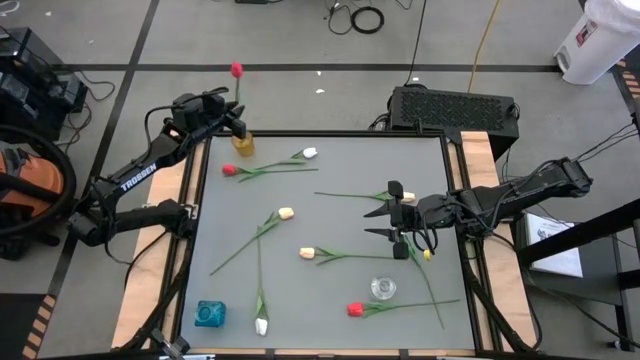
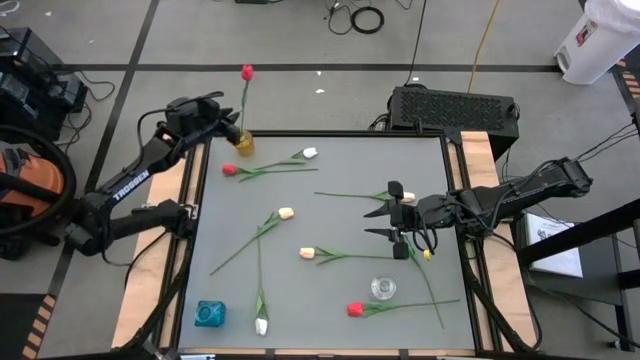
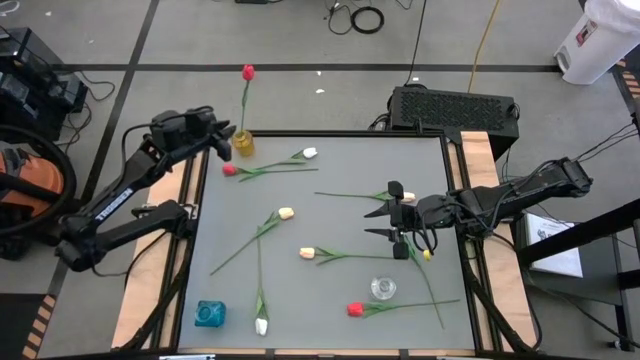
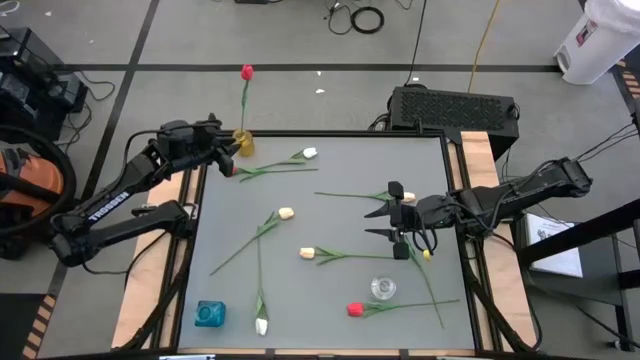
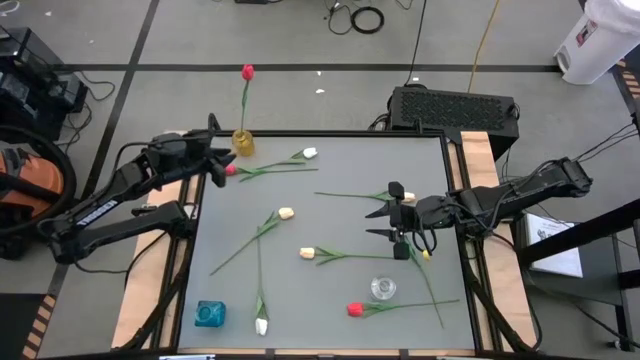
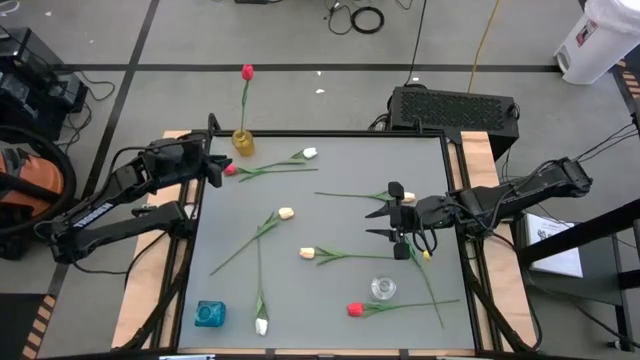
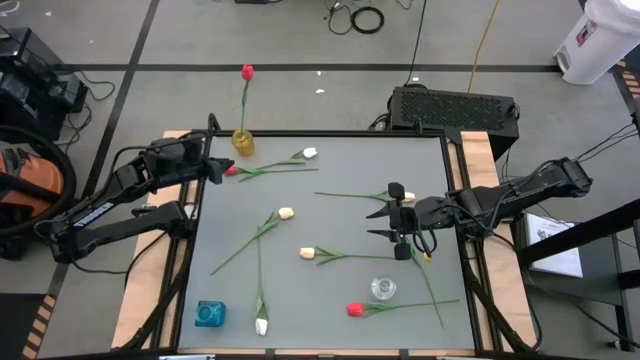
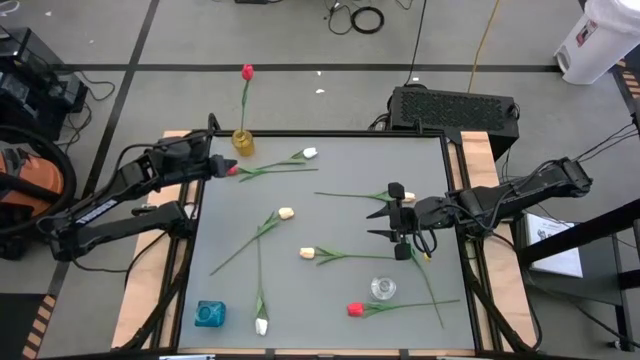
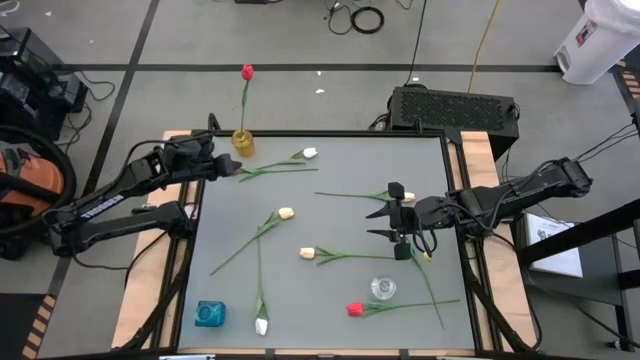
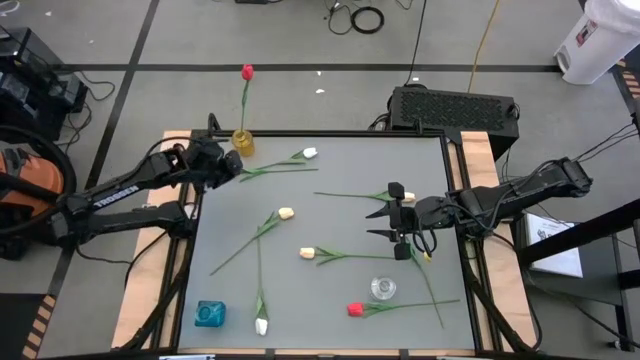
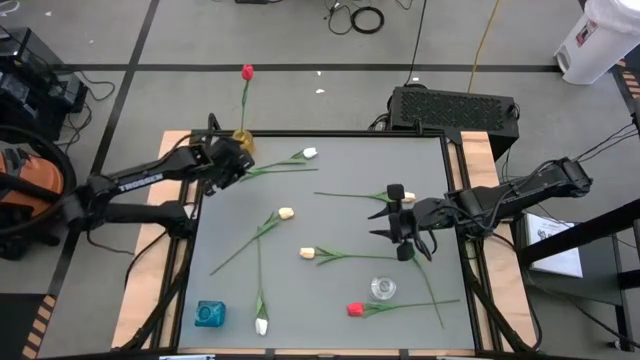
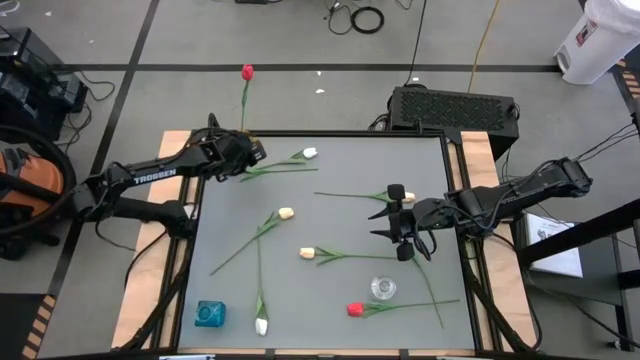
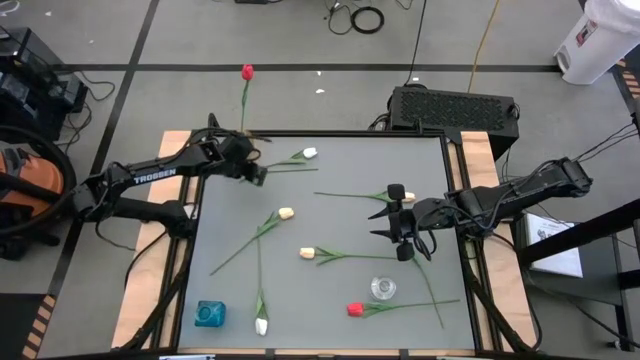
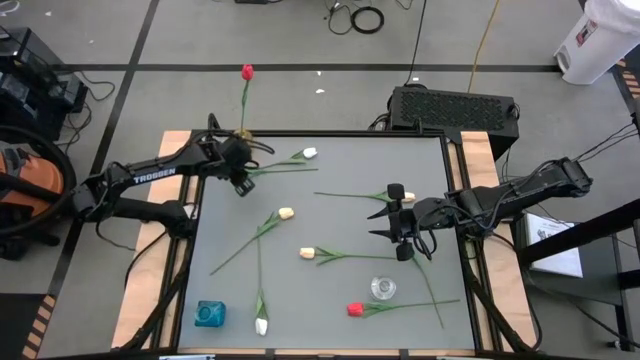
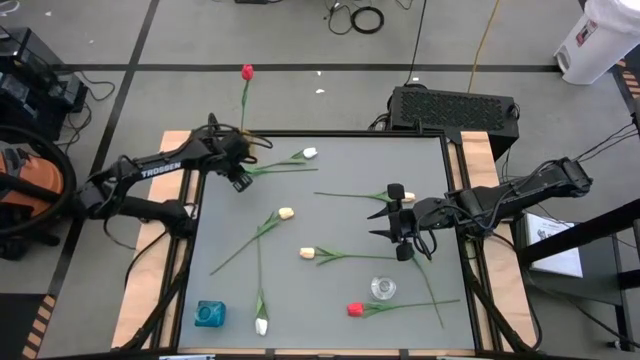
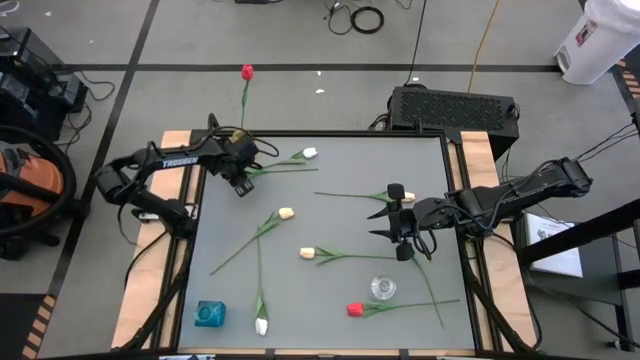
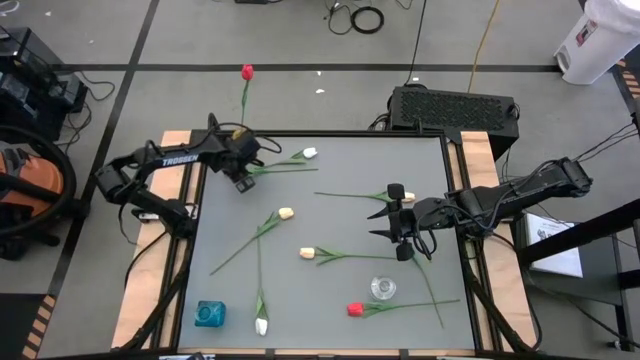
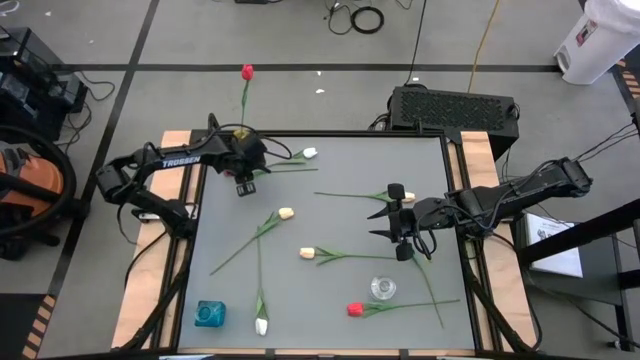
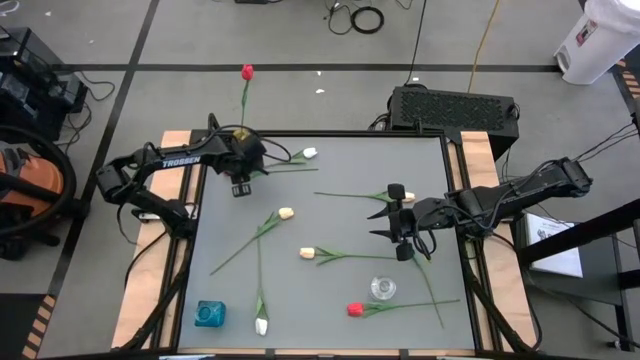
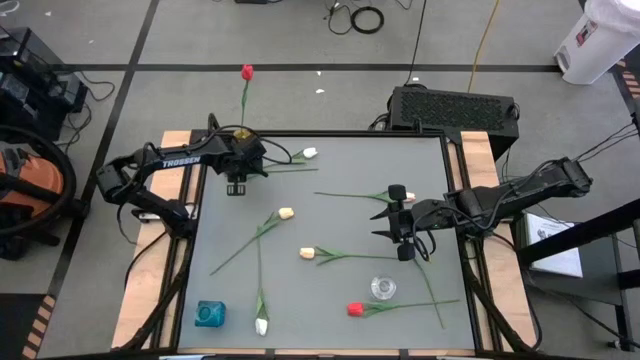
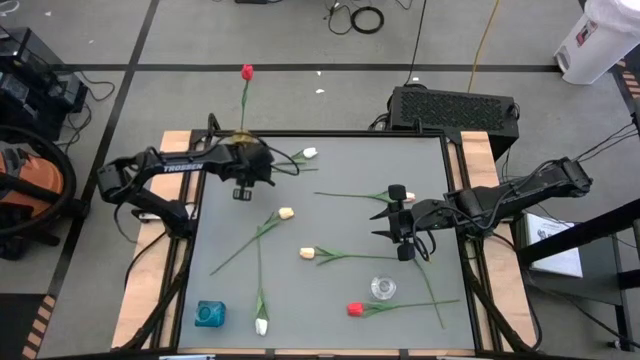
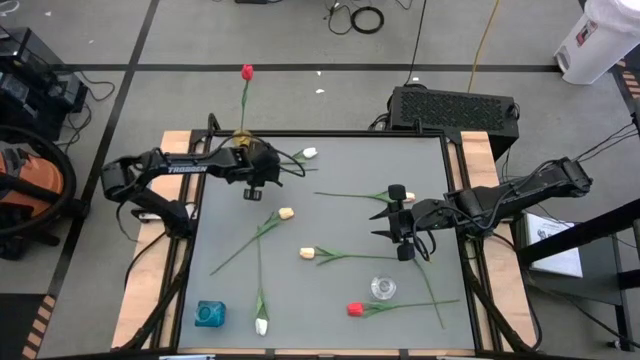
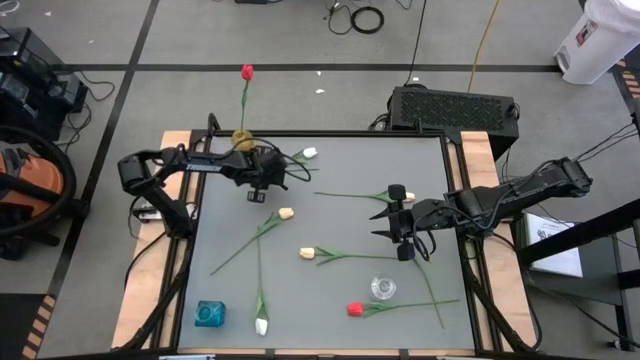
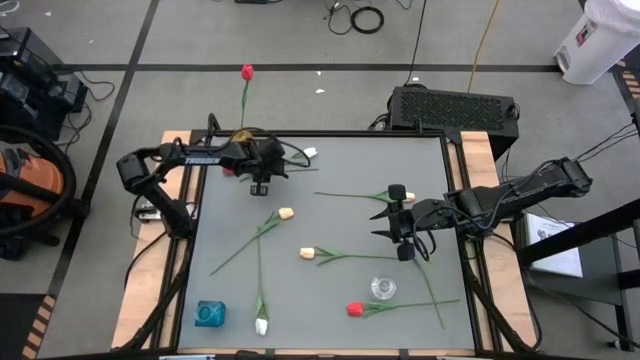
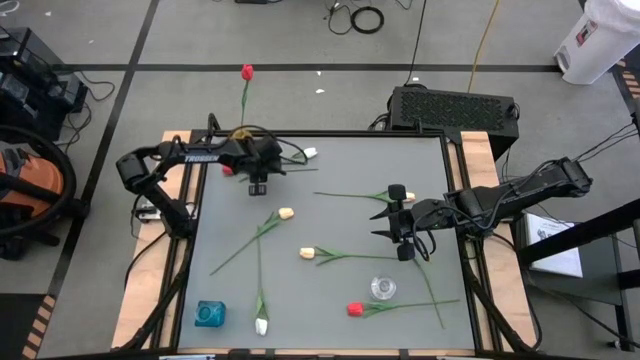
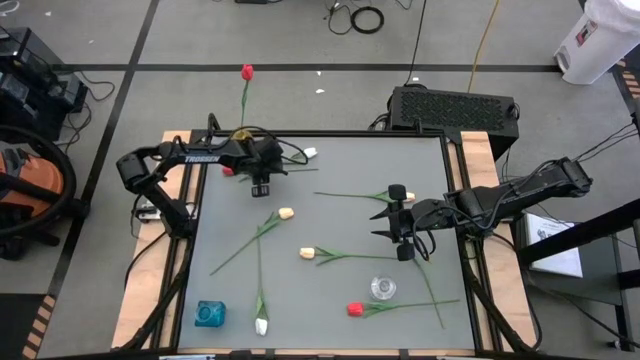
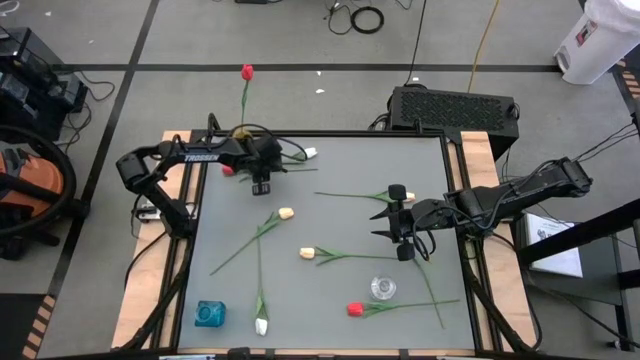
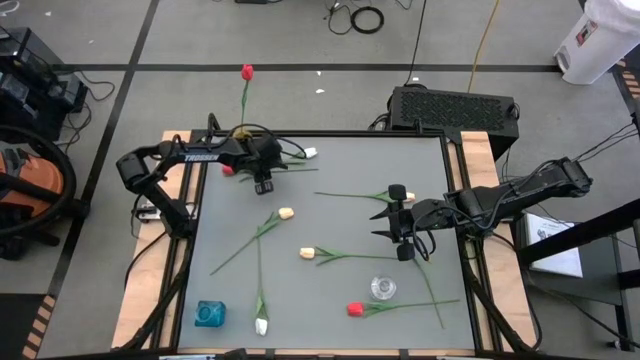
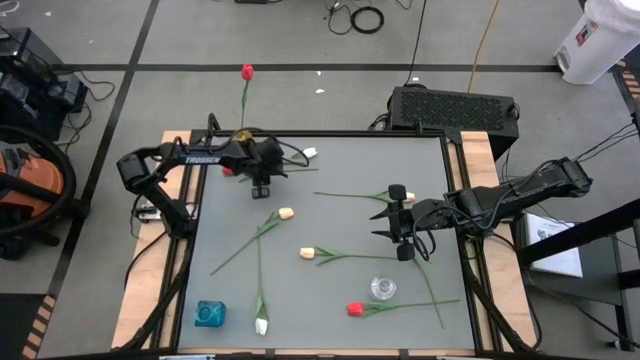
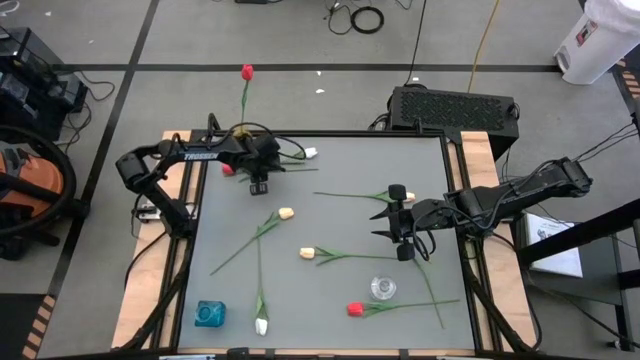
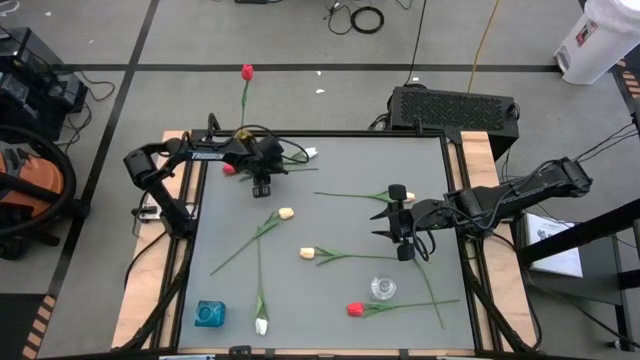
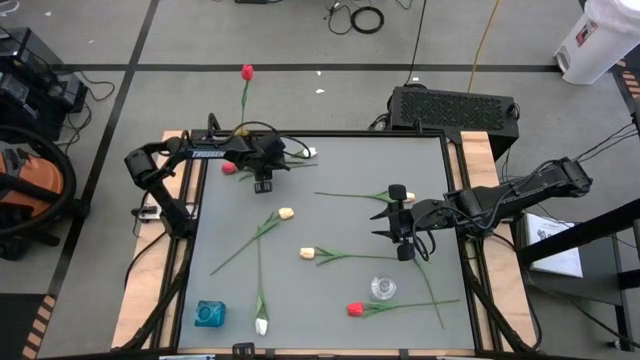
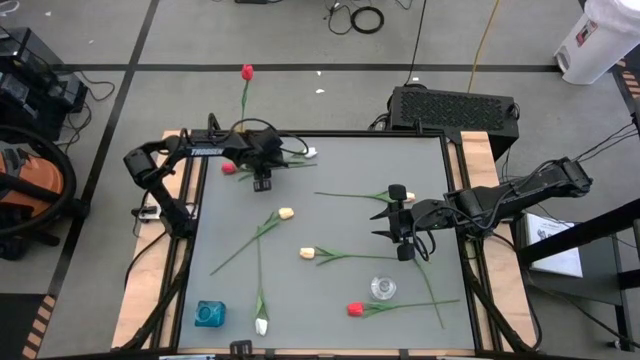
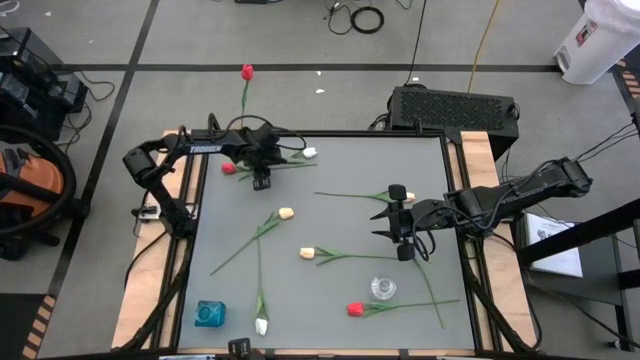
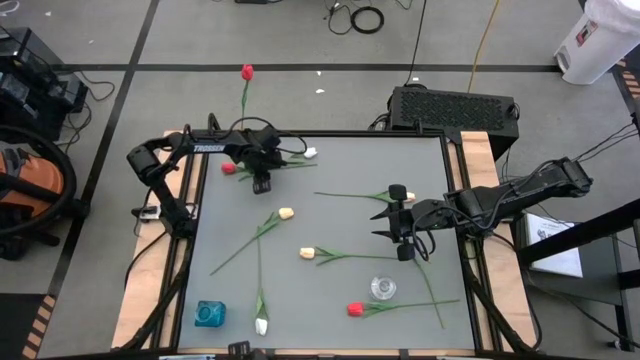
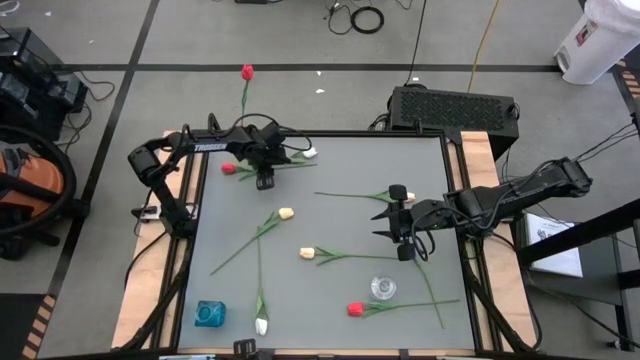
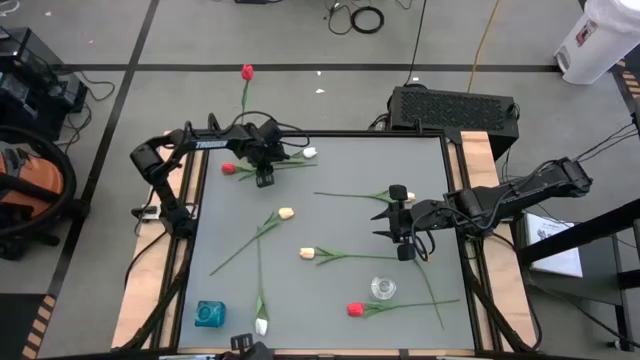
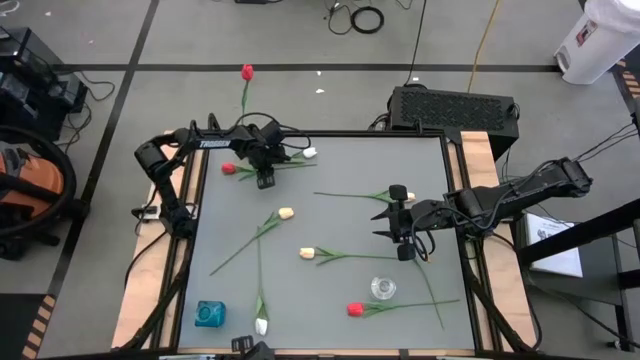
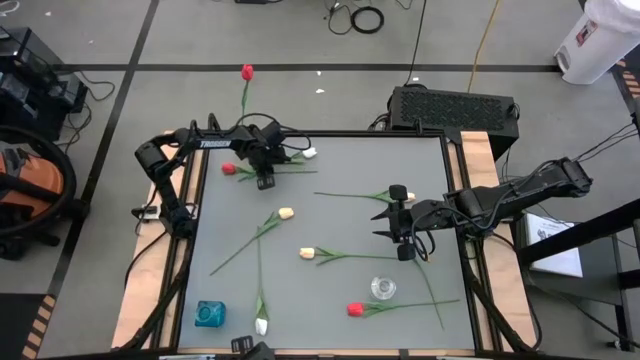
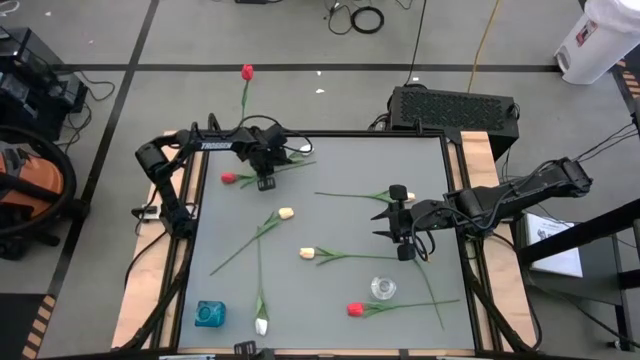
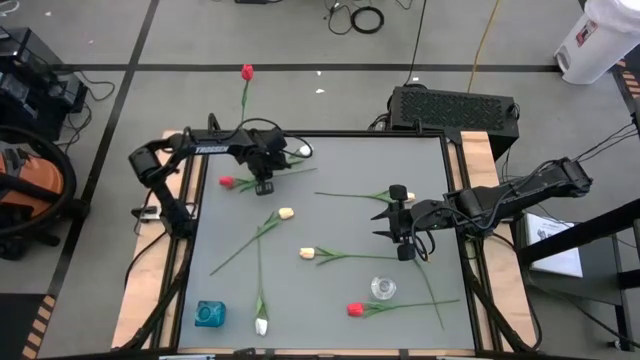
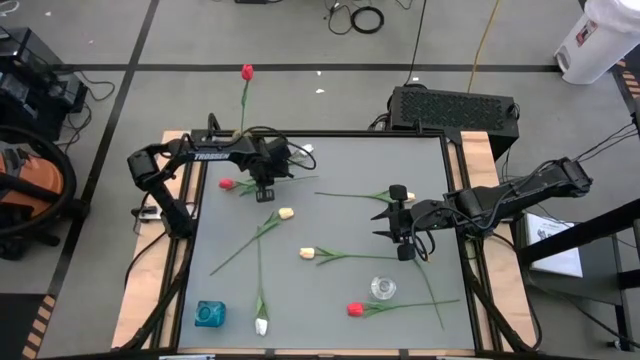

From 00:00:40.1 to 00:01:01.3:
Task: Sort flowers into vase by color
Put the top red tulip into the yellow vase
